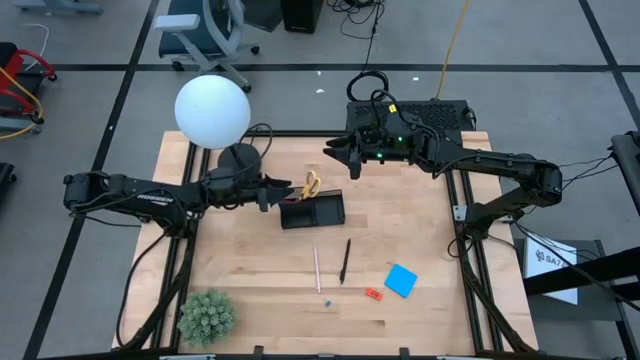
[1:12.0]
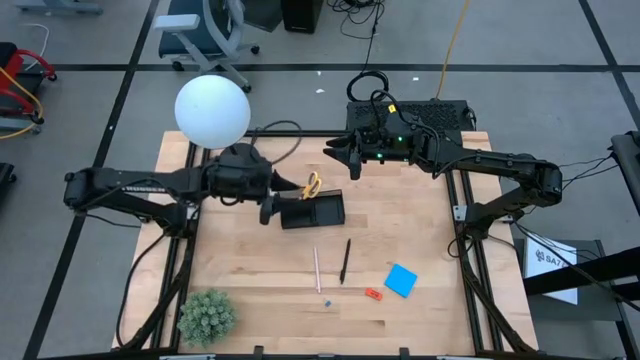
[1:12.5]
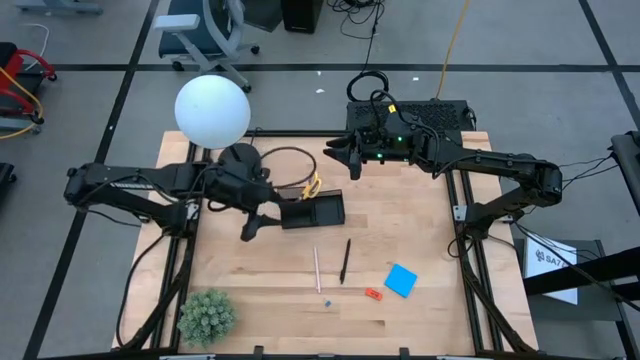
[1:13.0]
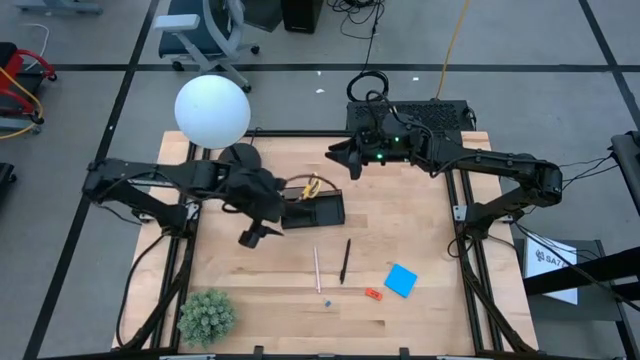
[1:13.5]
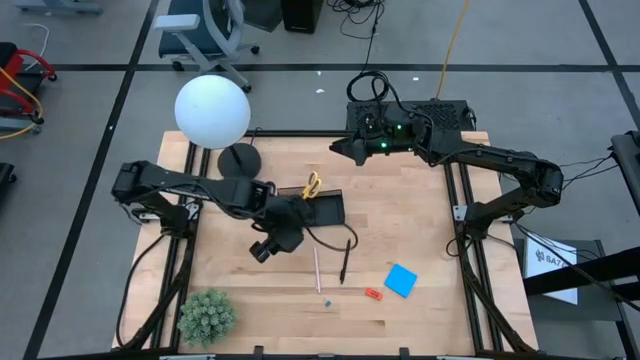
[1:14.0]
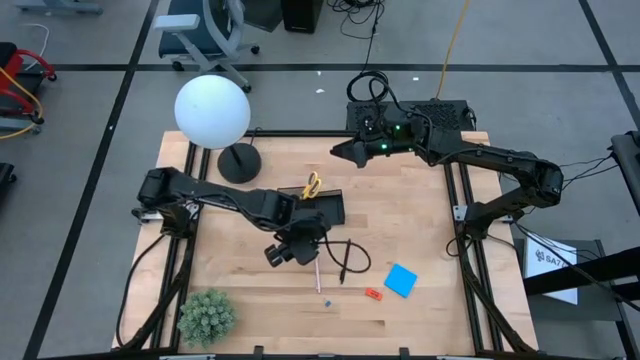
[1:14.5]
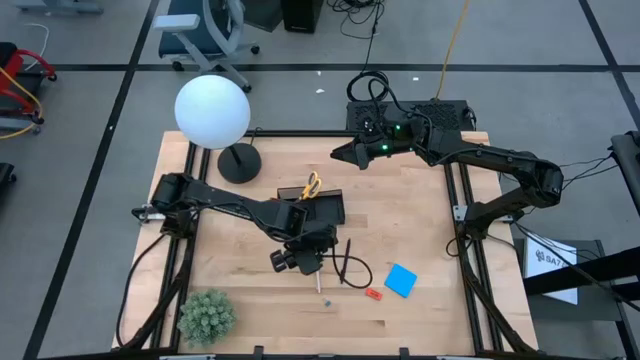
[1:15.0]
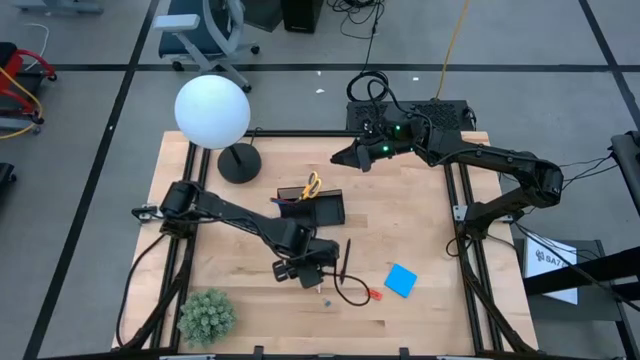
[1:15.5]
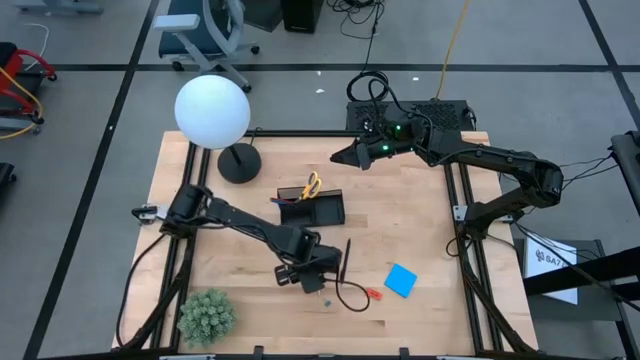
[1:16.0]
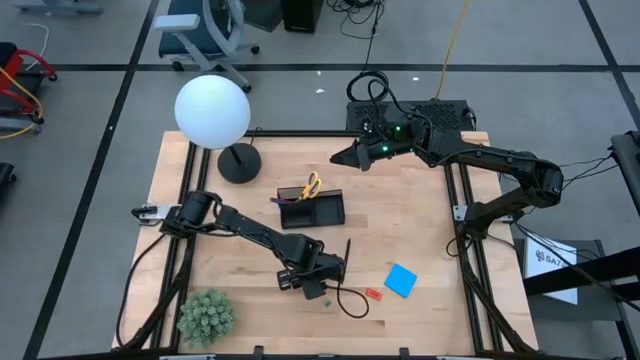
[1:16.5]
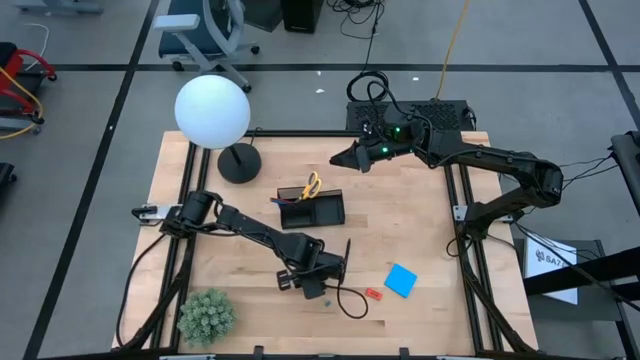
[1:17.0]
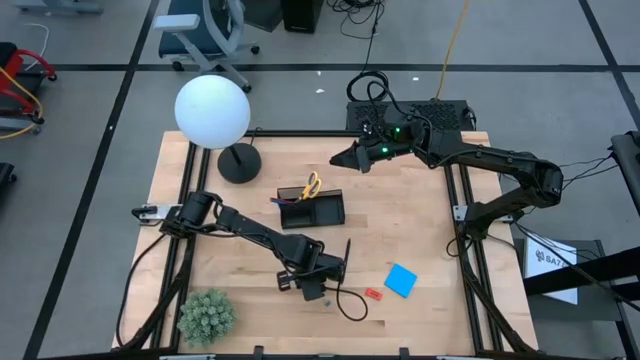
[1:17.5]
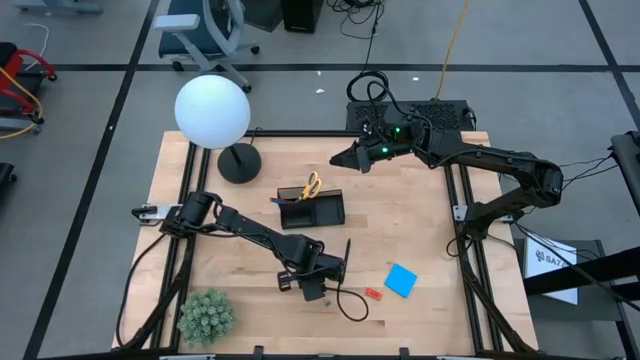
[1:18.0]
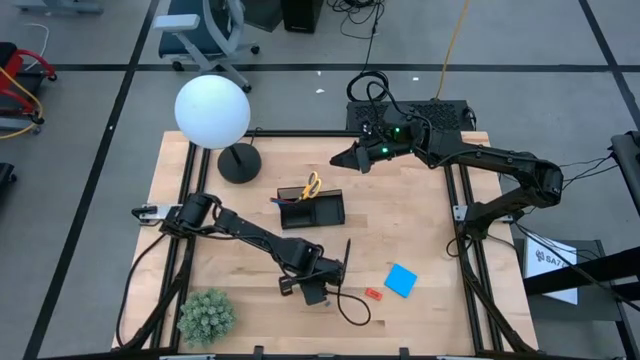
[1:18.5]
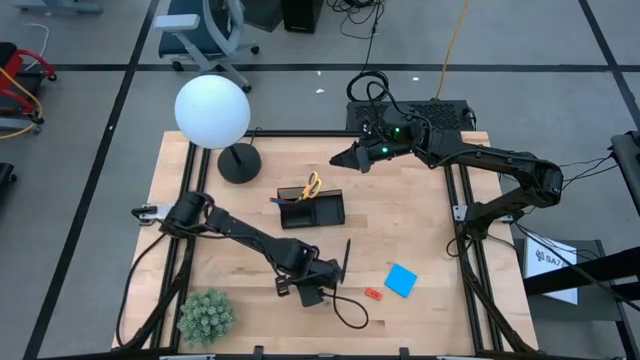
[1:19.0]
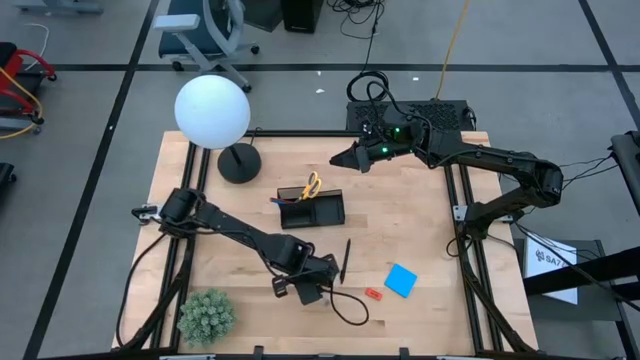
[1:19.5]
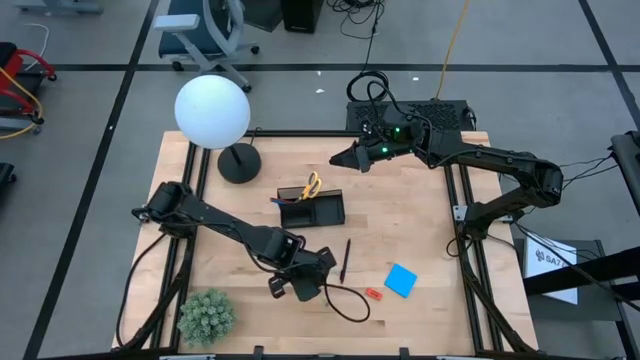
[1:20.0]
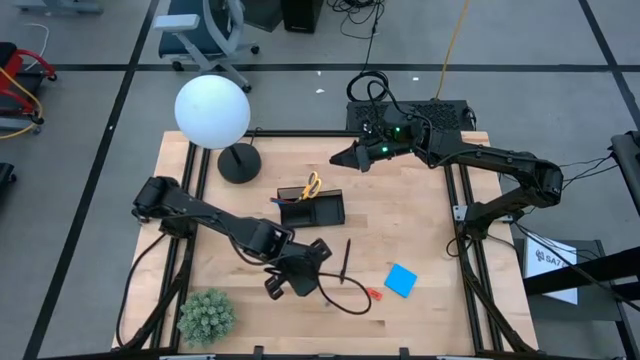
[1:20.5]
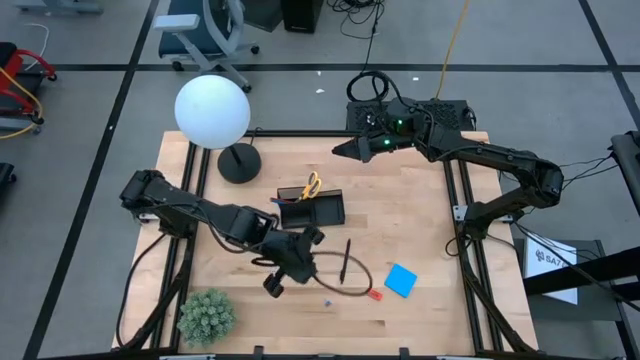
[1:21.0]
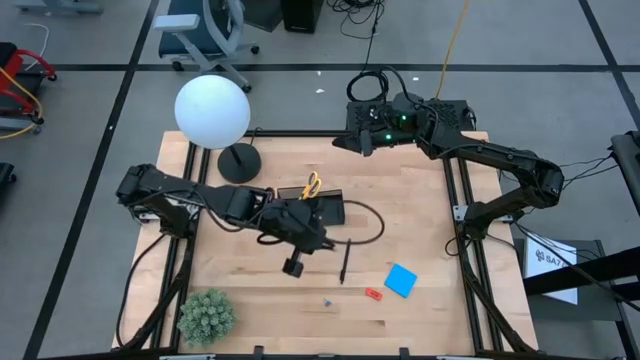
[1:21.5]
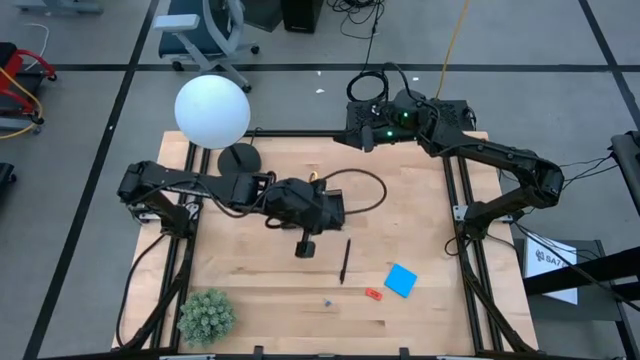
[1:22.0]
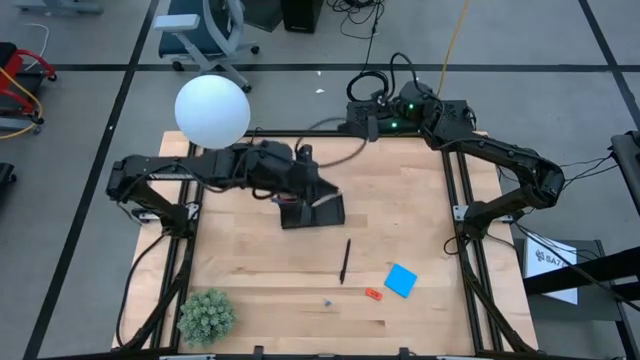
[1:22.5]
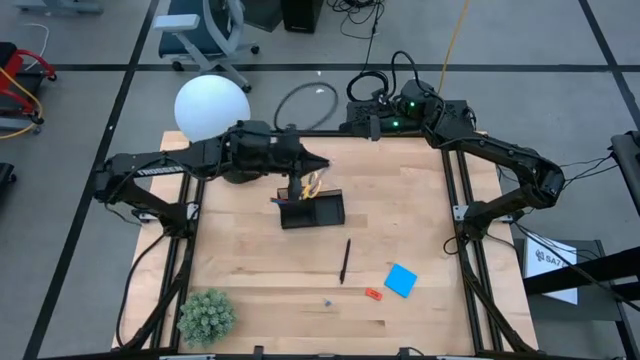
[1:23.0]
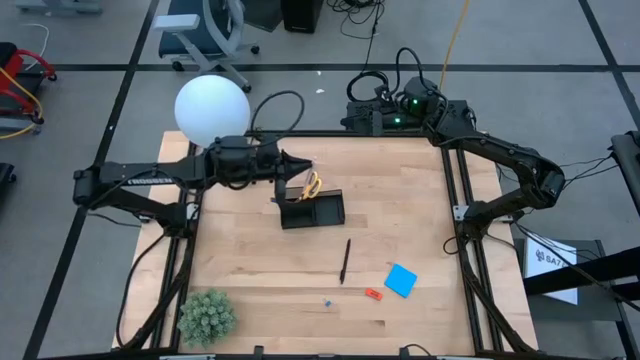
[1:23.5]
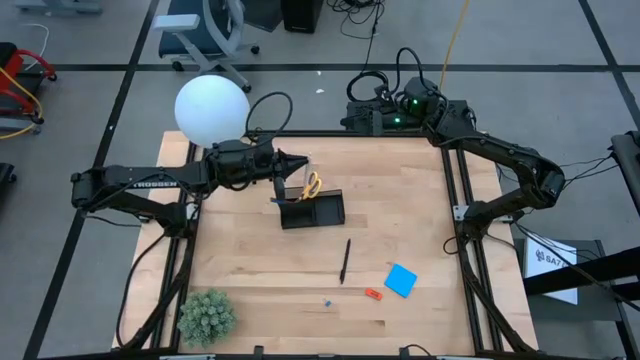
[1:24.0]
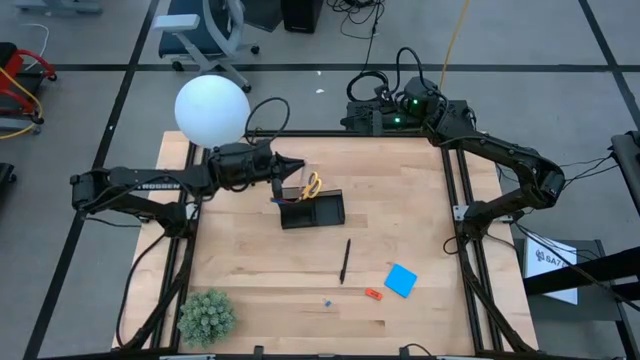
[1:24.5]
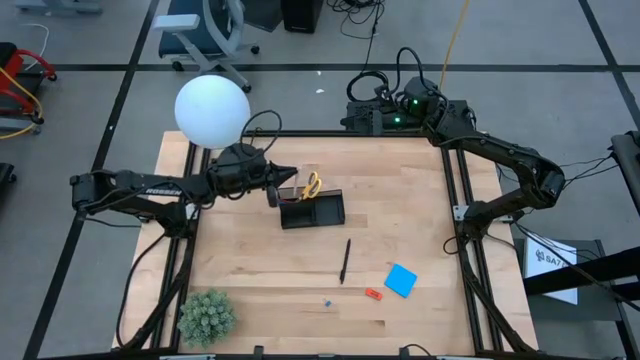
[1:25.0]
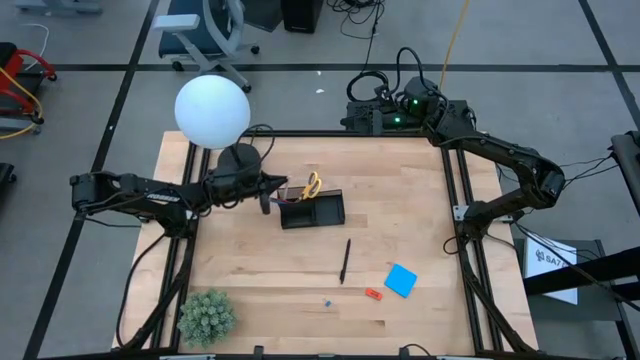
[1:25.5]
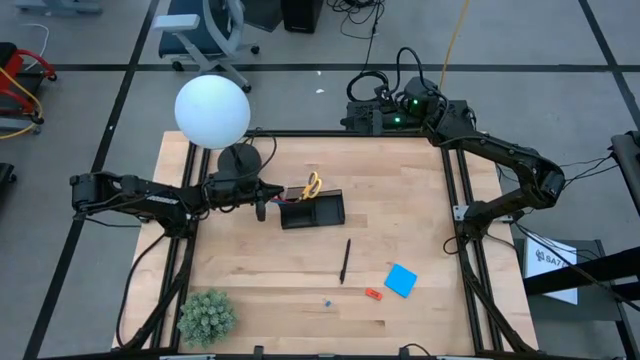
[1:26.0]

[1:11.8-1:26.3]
Task: Pick and place office supplies into organizer
Put the white pen into the black organizer
